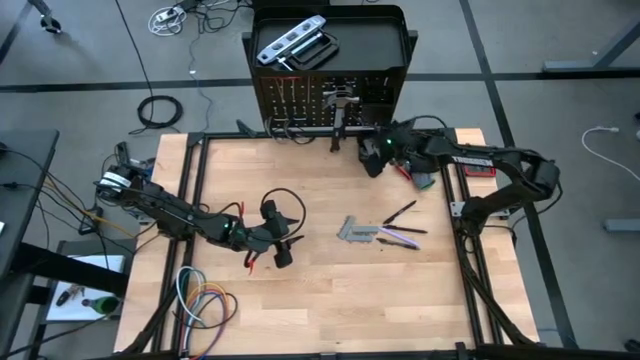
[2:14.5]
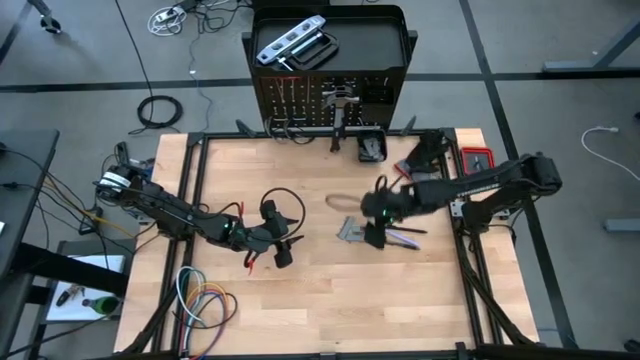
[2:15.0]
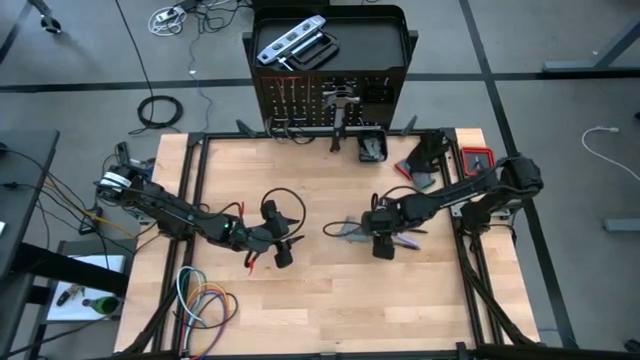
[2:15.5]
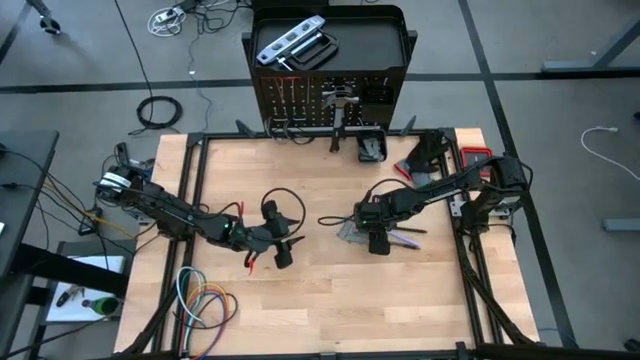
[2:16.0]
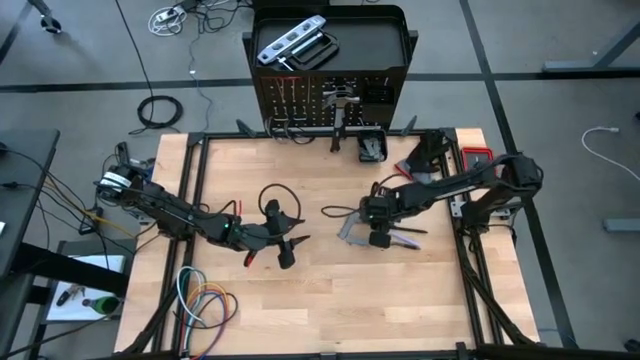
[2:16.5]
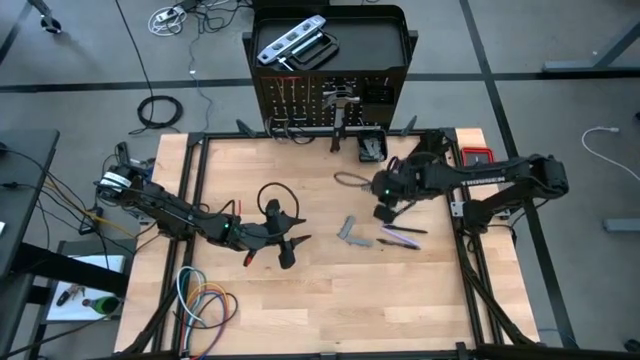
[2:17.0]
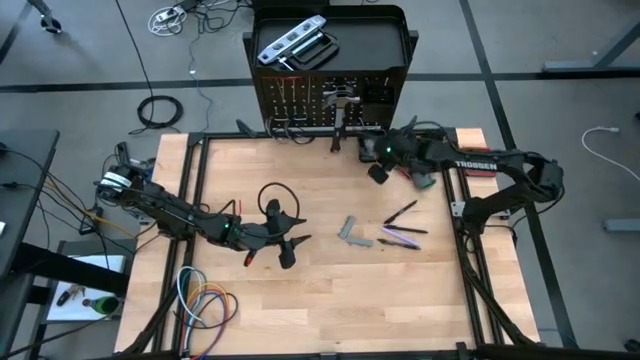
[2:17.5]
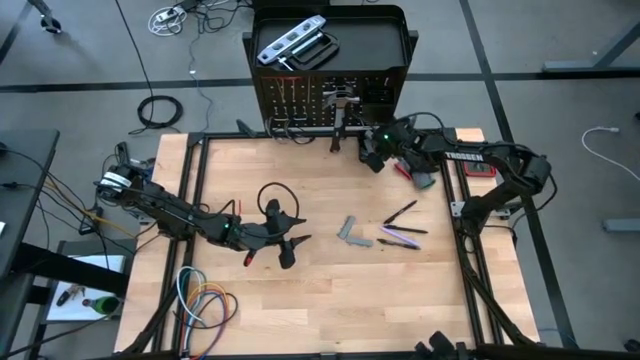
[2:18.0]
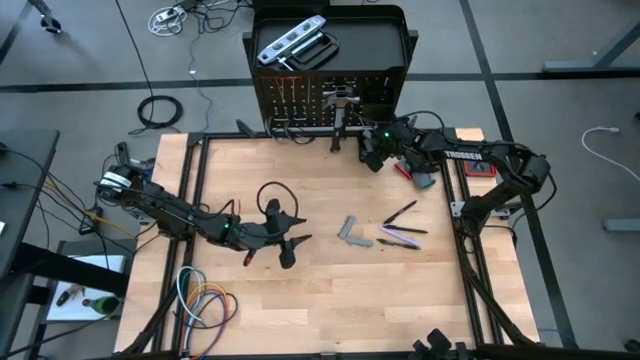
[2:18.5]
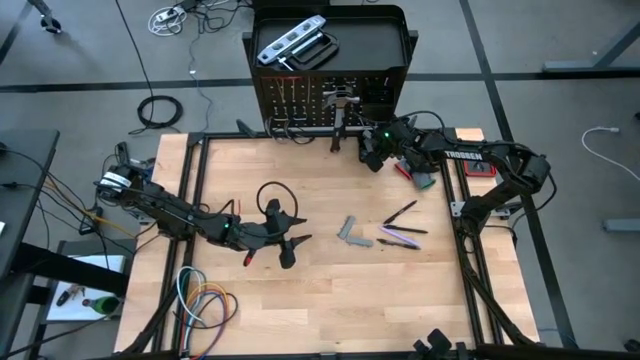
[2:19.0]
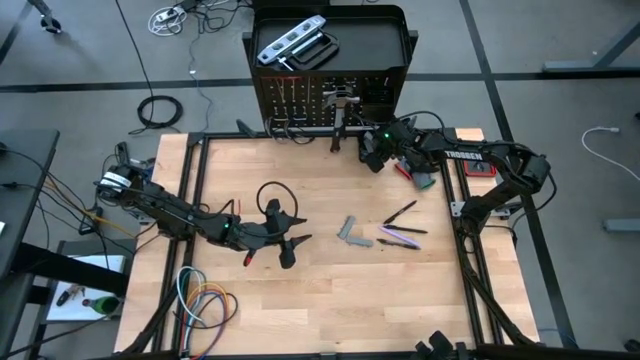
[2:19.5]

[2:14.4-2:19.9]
Task: Hang tools onto peg board
Put the top right terminal block into the bottom basket of the peg board

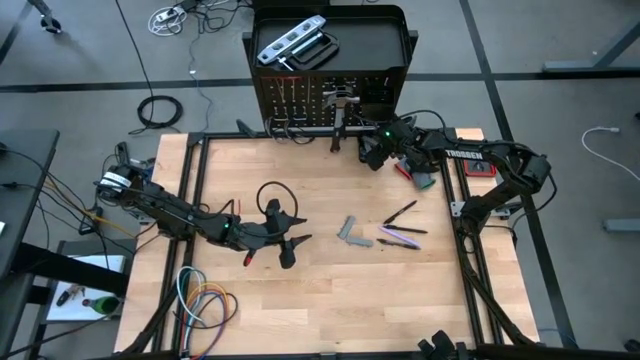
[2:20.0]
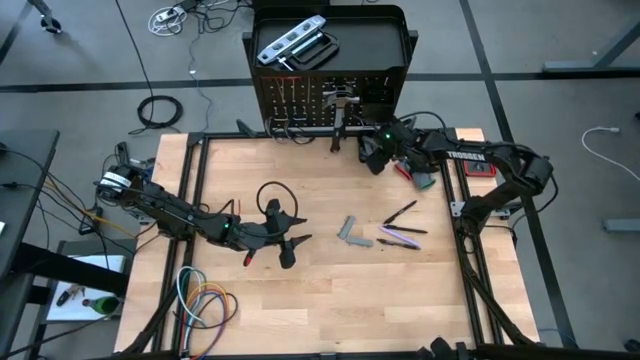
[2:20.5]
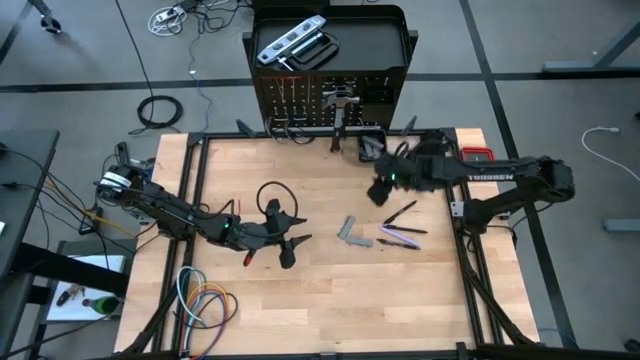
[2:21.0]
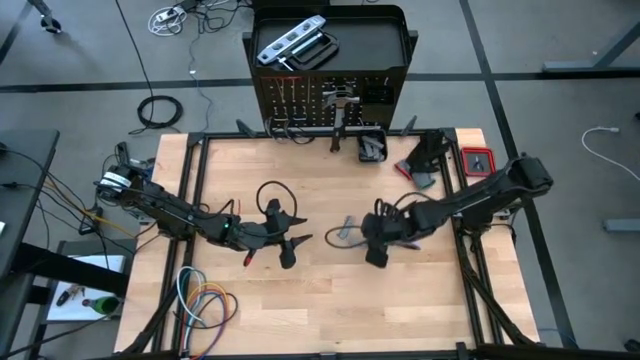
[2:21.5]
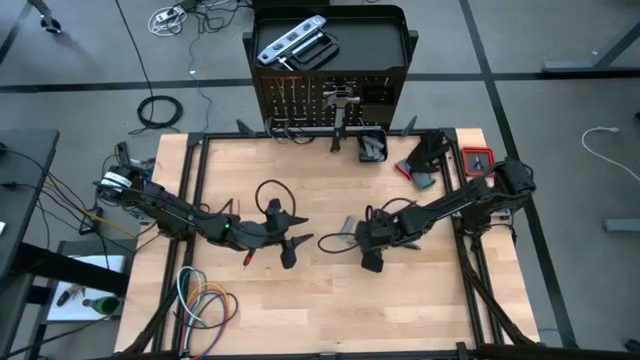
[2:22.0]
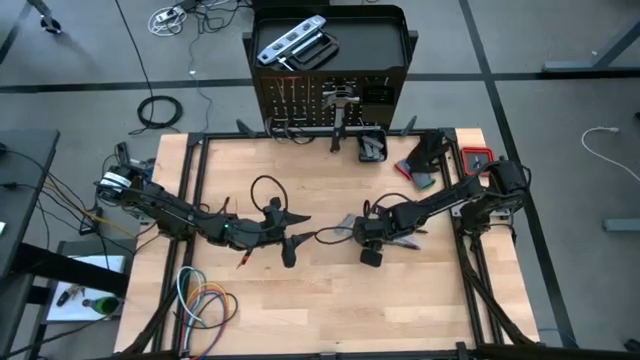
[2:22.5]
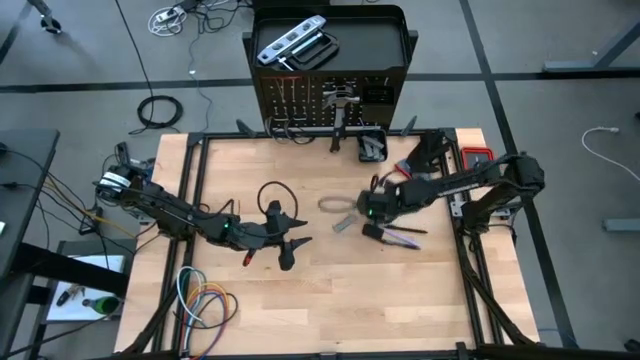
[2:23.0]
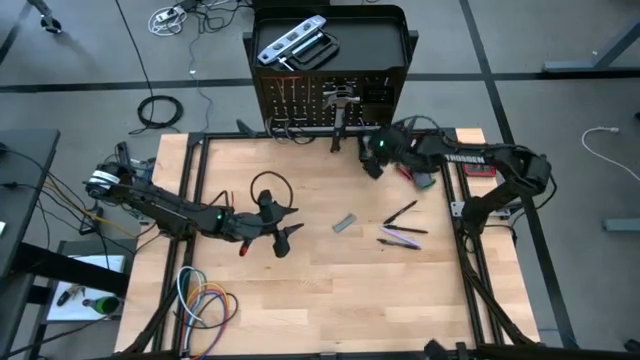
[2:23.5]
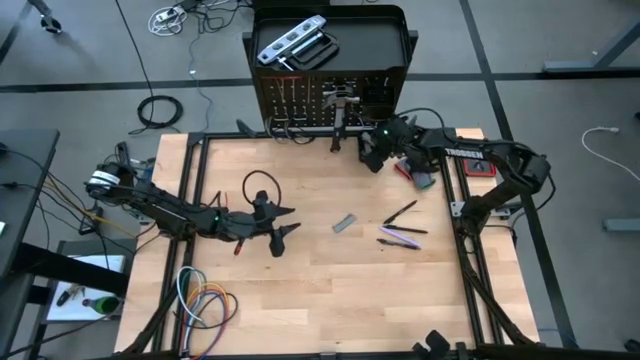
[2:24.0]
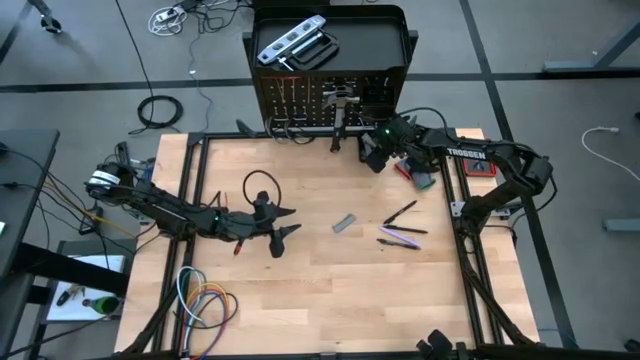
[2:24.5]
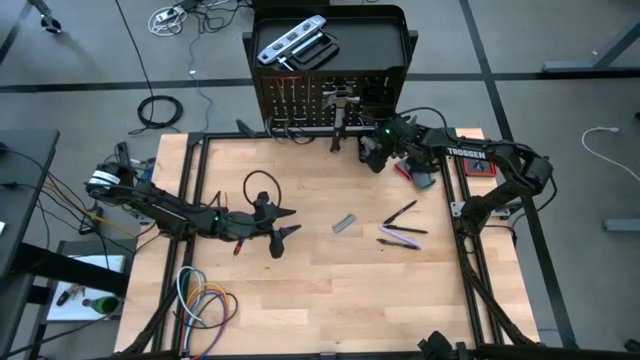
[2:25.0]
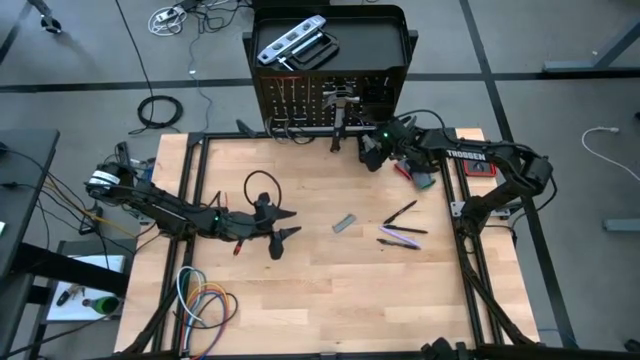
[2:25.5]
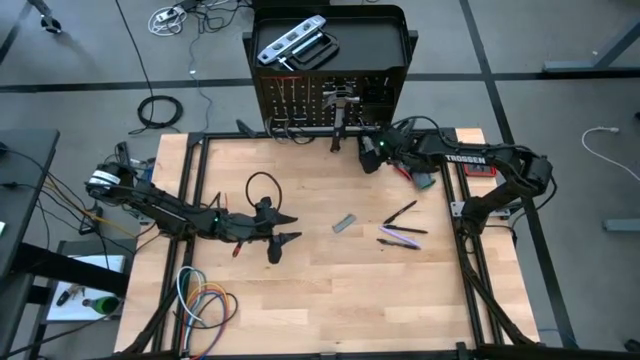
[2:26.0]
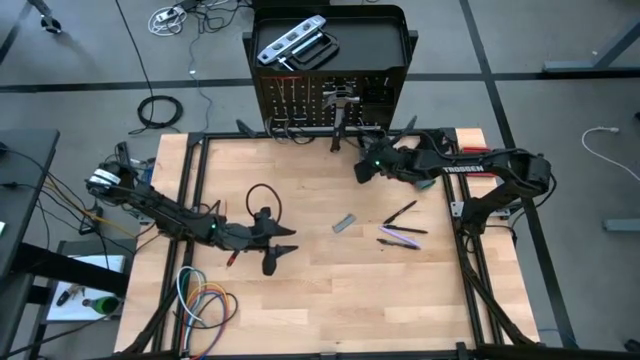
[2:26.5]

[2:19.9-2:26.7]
Put the bottom terminal block into the bottom basket of the peg board

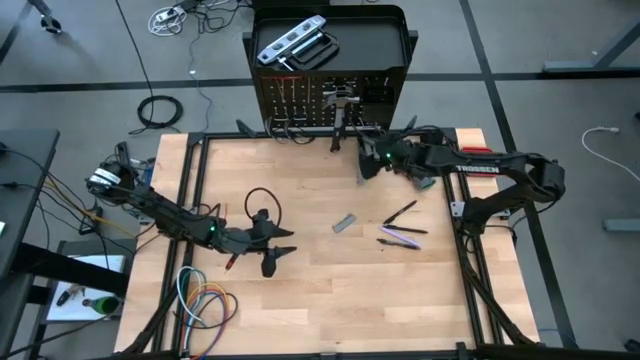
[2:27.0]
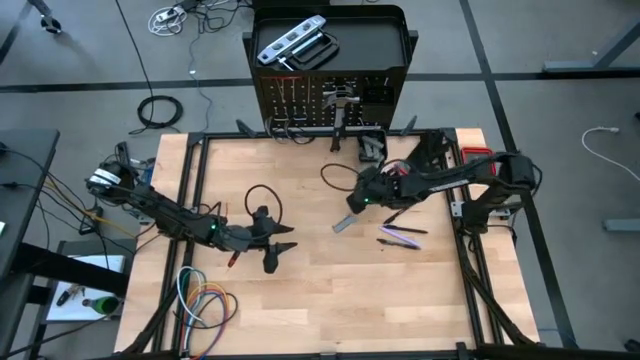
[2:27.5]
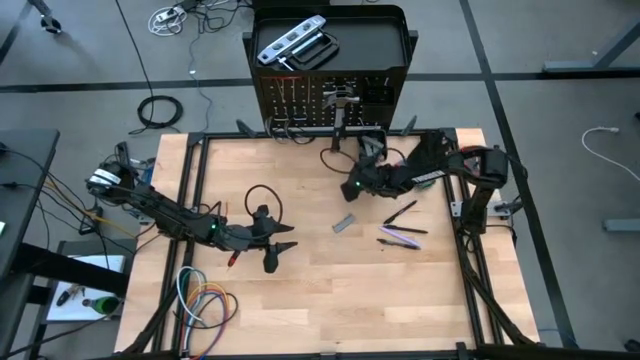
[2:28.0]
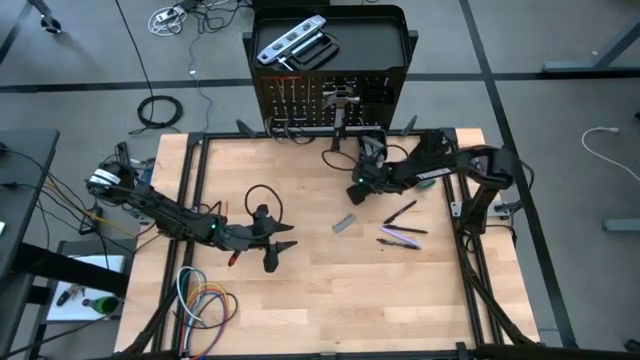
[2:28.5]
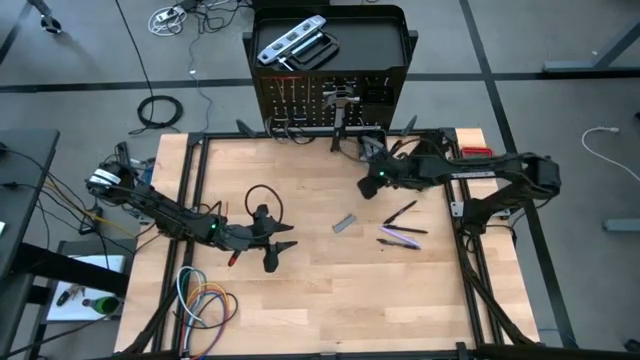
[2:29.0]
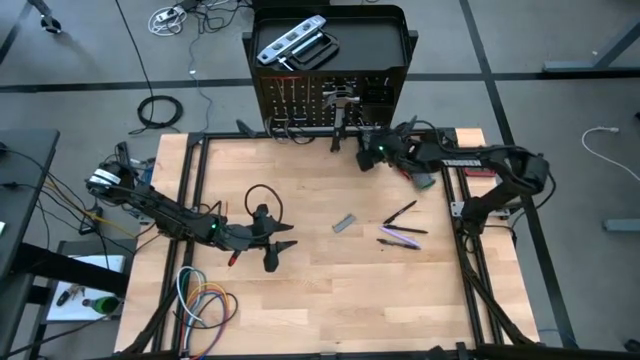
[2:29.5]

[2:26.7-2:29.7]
Put the bottom terminal block into the bottom basket of the peg board

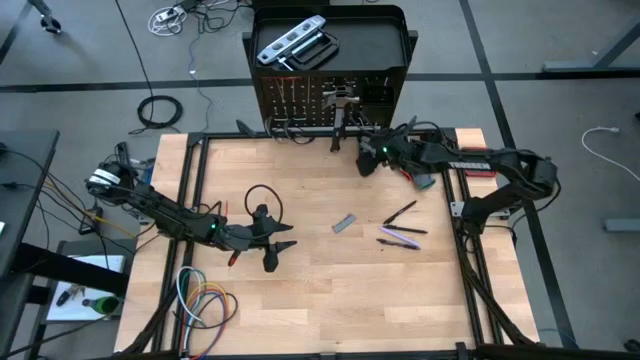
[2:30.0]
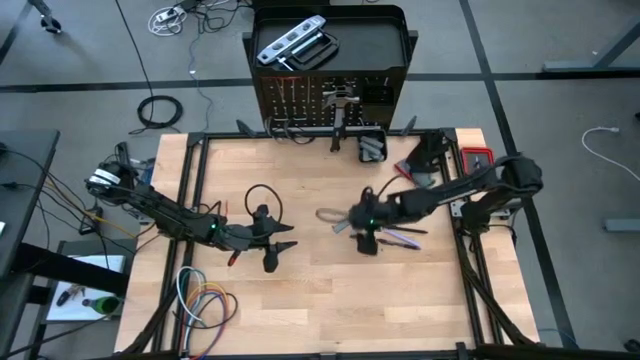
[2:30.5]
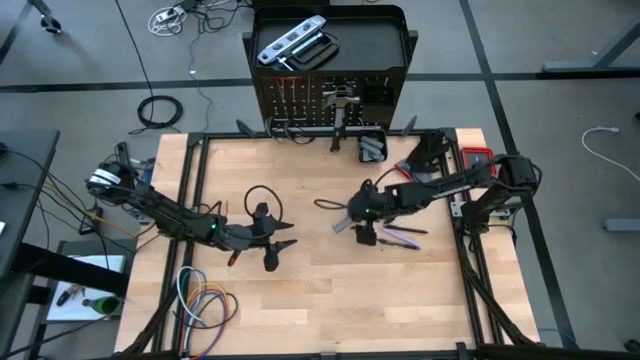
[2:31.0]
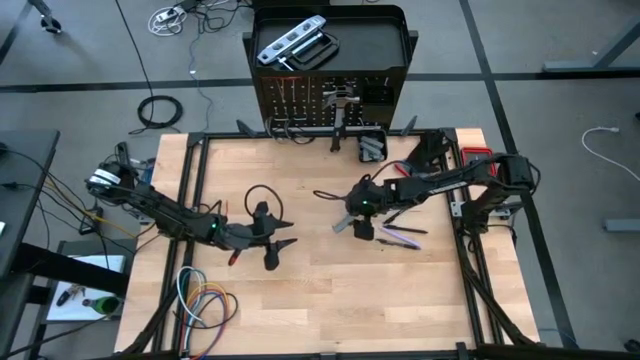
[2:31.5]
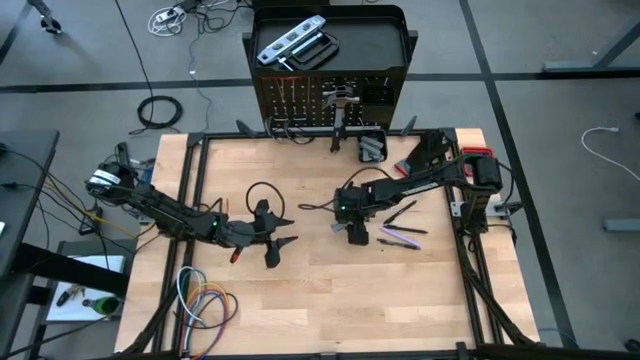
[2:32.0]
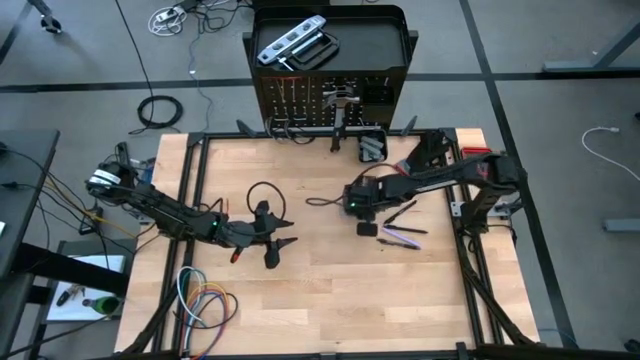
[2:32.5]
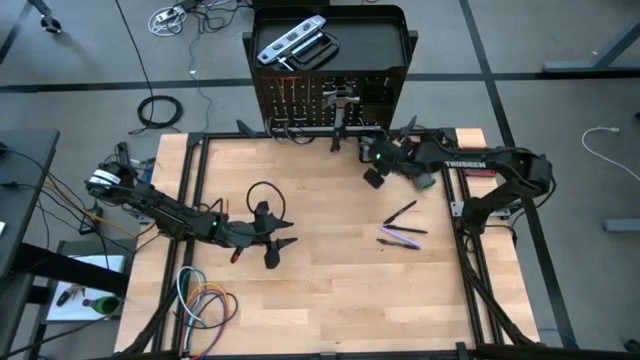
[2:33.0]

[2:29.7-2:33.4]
Put the terminal block into the bottom basket of the peg board

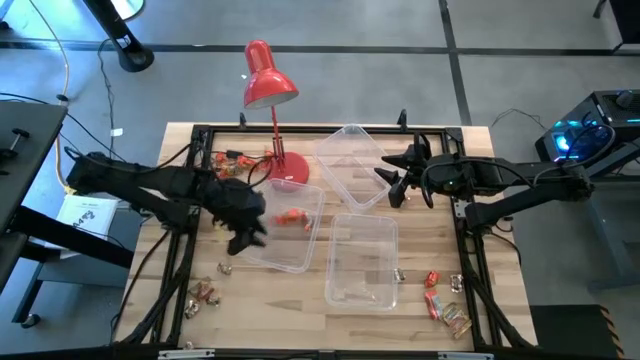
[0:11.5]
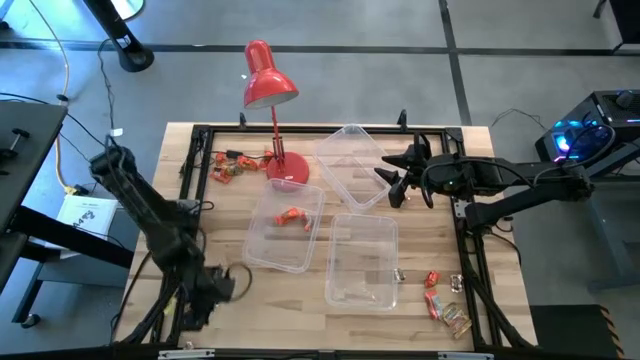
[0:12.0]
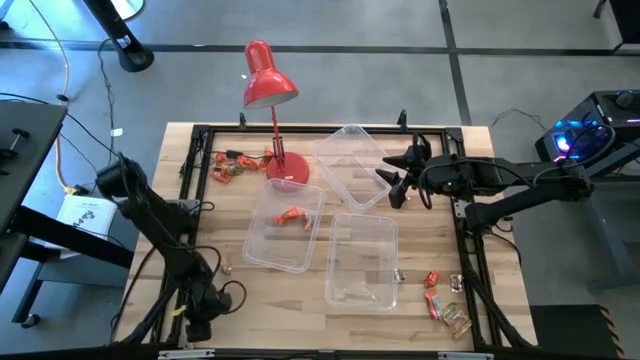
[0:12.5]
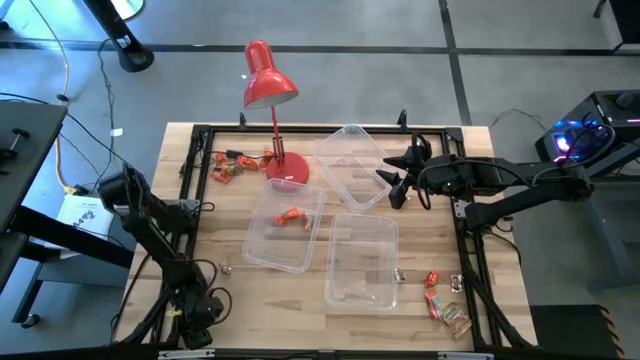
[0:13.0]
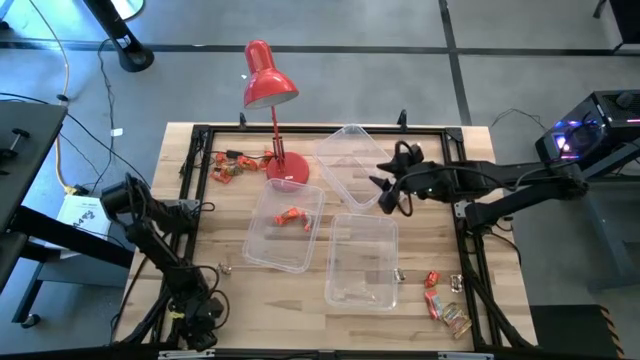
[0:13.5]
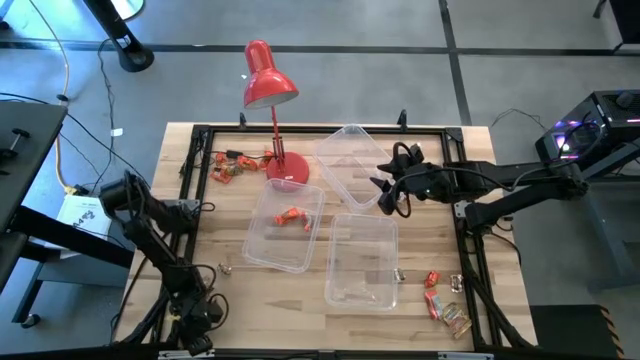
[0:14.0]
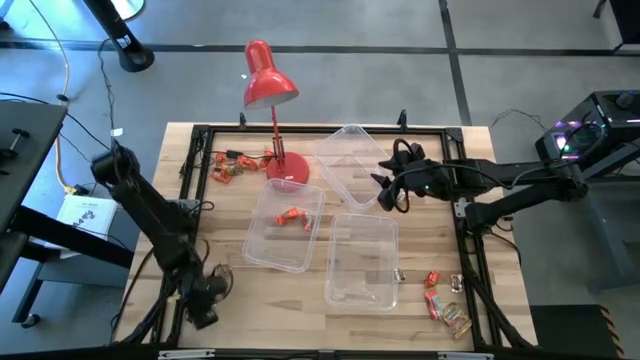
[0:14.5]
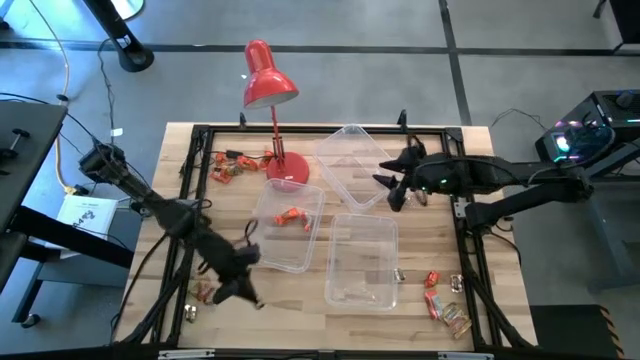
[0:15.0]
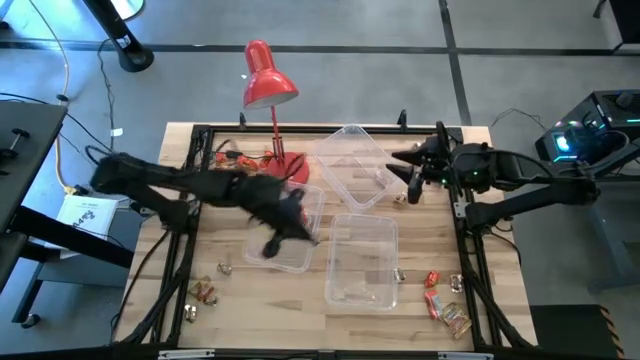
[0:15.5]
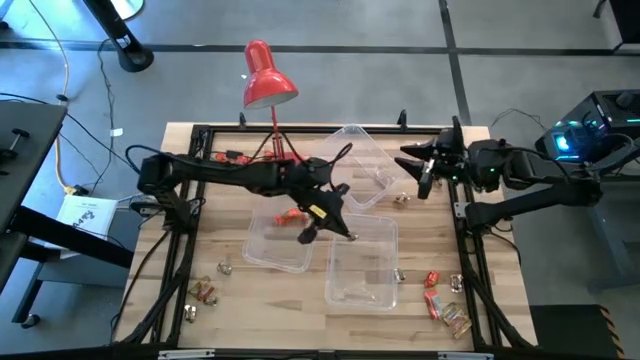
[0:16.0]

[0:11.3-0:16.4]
Task: Sort candy
Put the brown candy into the bottom right transparent bin
